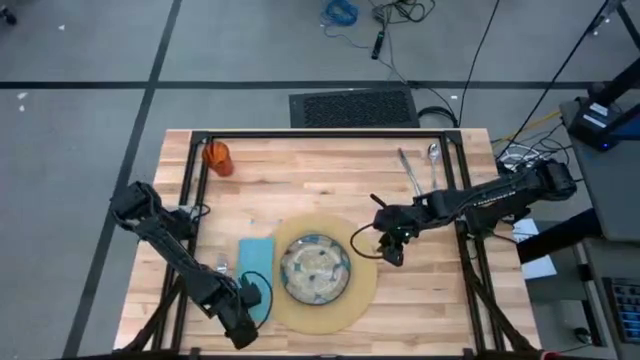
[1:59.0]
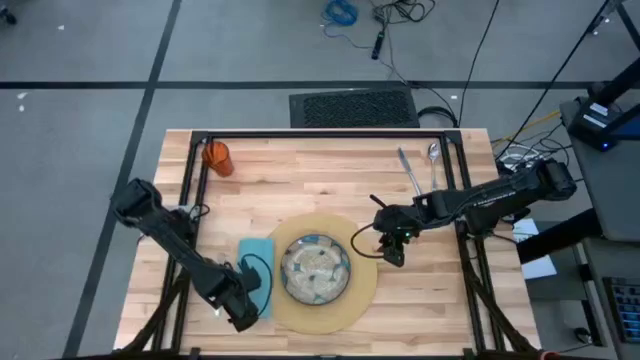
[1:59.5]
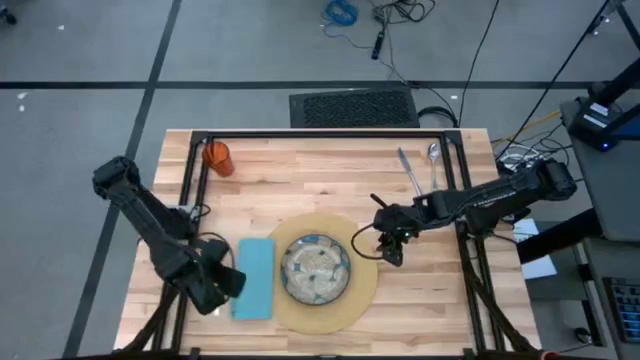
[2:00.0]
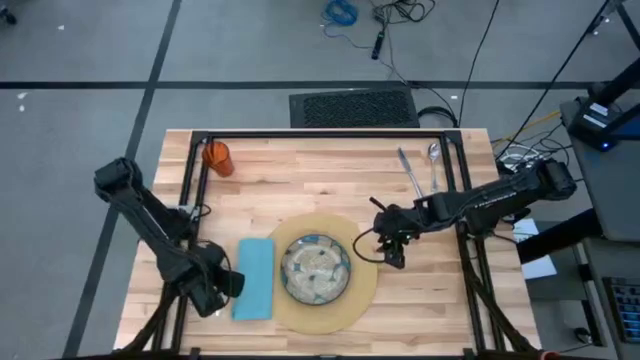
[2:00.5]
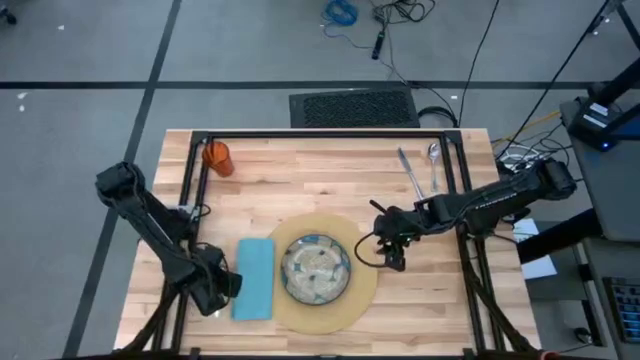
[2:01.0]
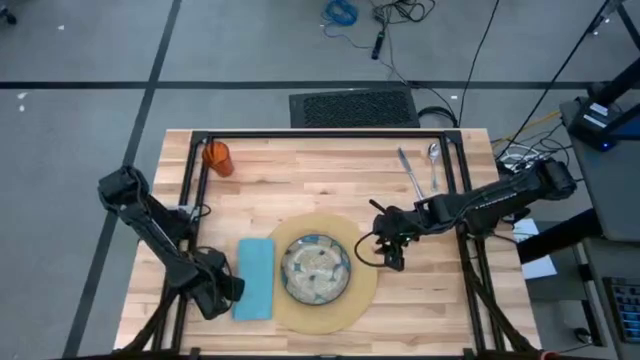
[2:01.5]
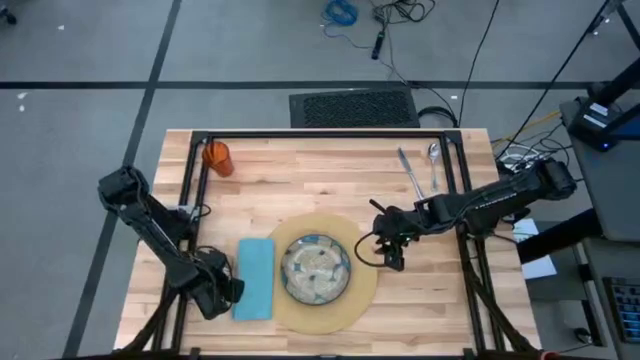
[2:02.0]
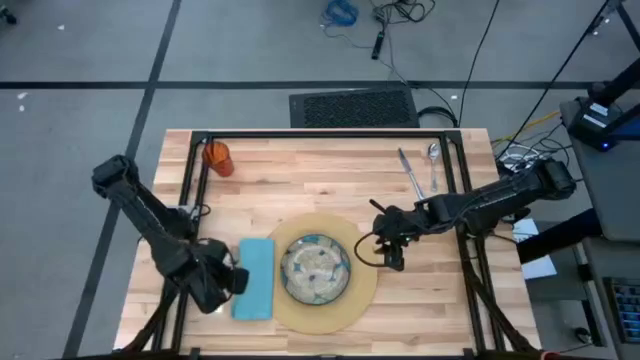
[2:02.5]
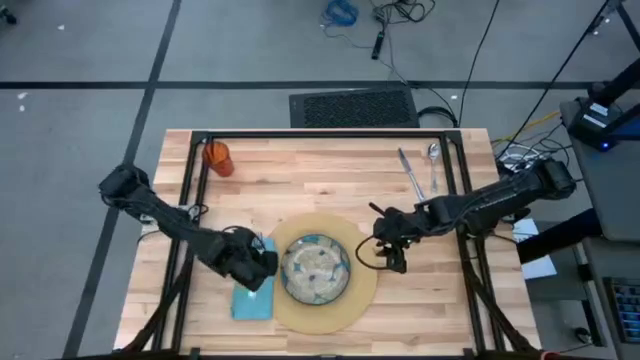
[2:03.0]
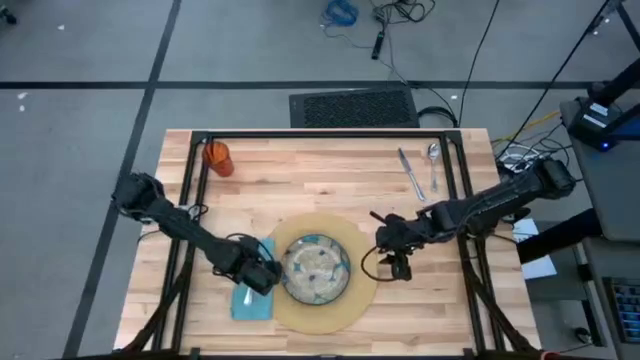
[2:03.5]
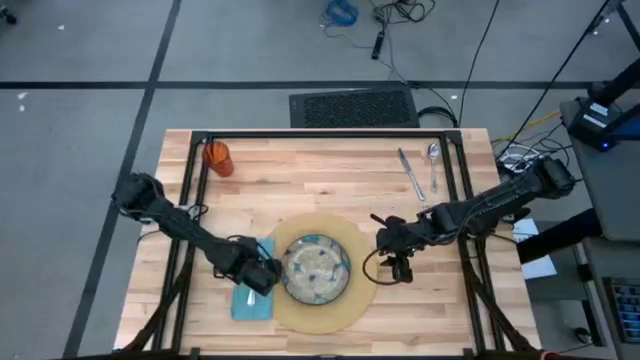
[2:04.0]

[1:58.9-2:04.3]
Task: Set table place
Put the fork on top of the blue napkin

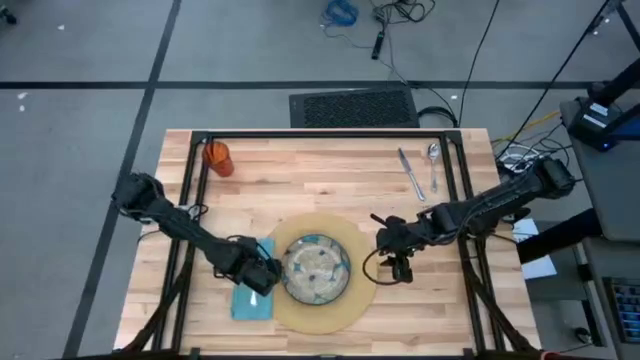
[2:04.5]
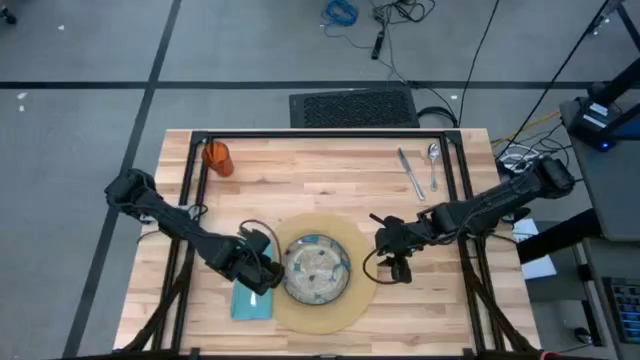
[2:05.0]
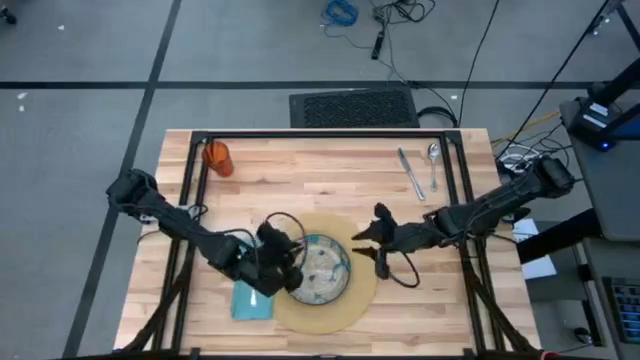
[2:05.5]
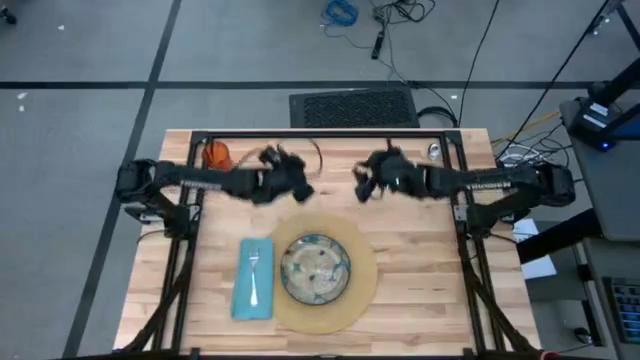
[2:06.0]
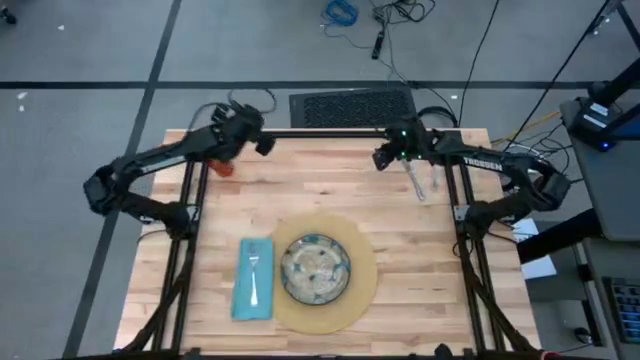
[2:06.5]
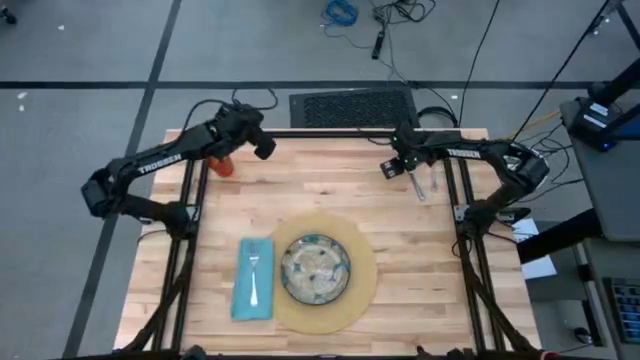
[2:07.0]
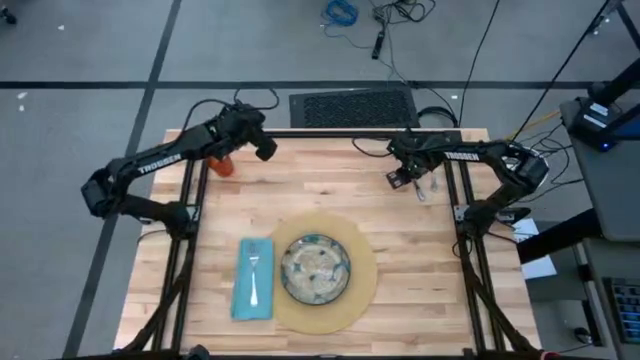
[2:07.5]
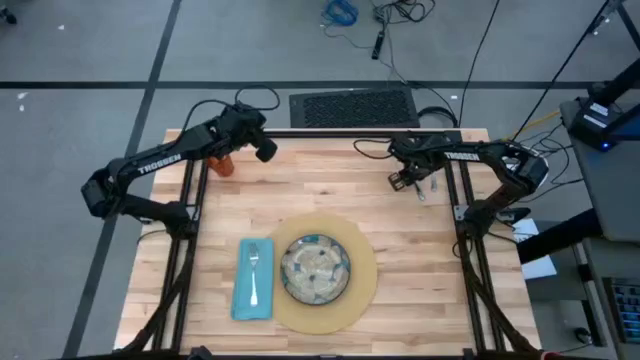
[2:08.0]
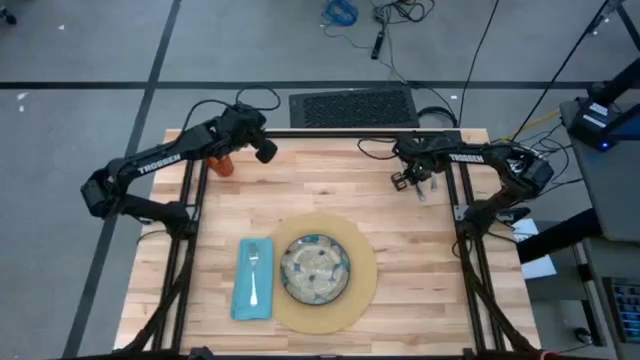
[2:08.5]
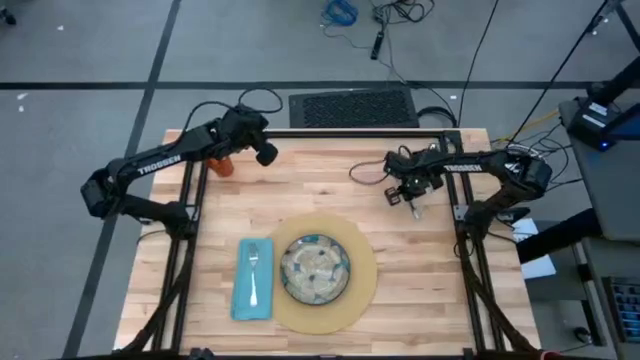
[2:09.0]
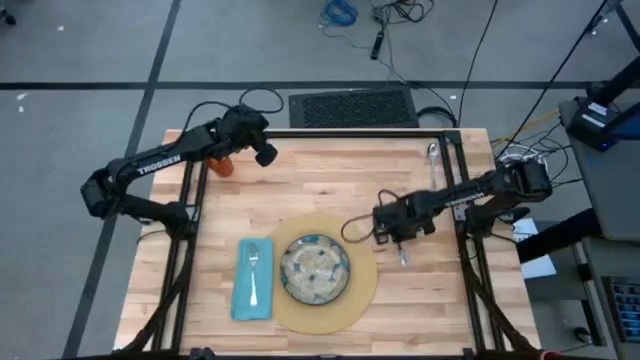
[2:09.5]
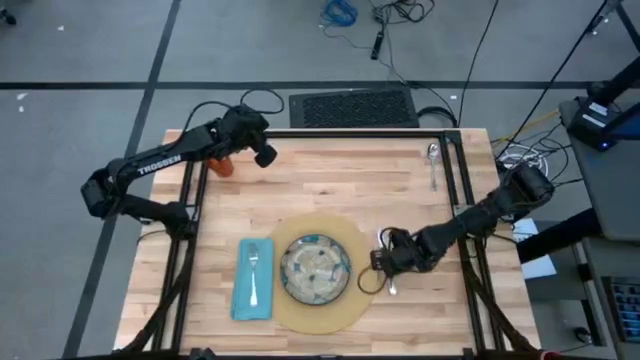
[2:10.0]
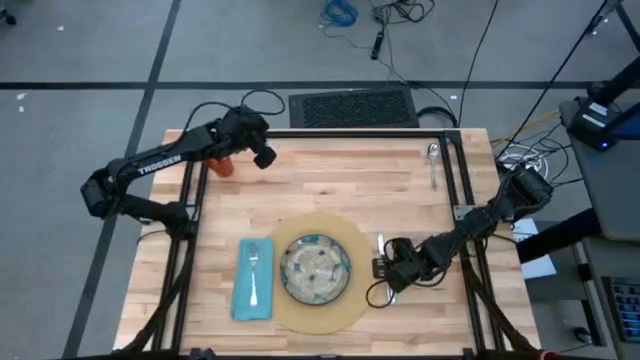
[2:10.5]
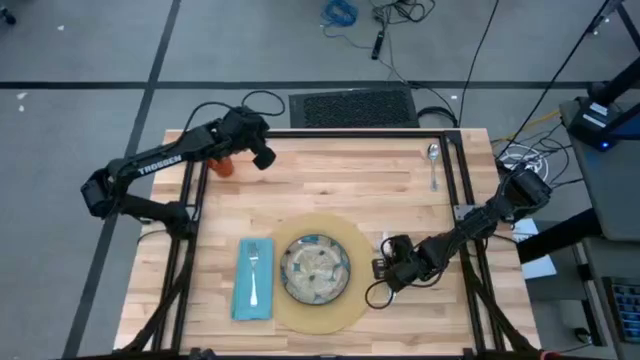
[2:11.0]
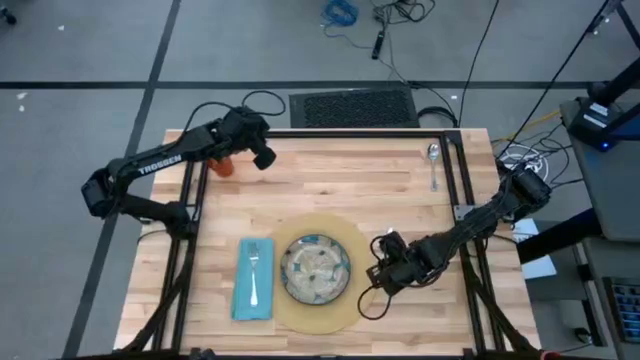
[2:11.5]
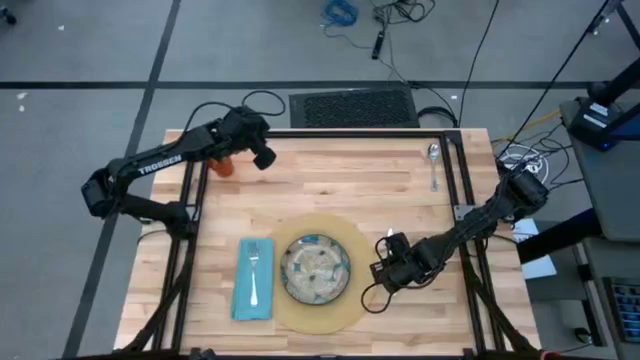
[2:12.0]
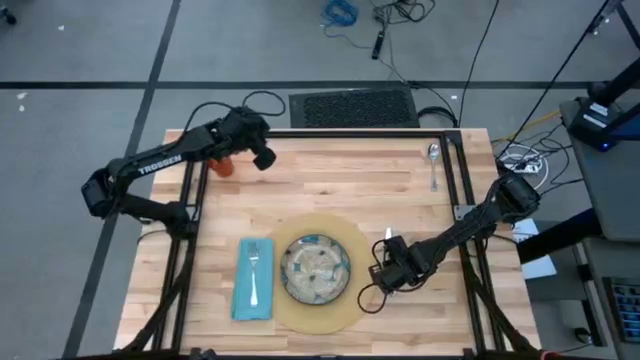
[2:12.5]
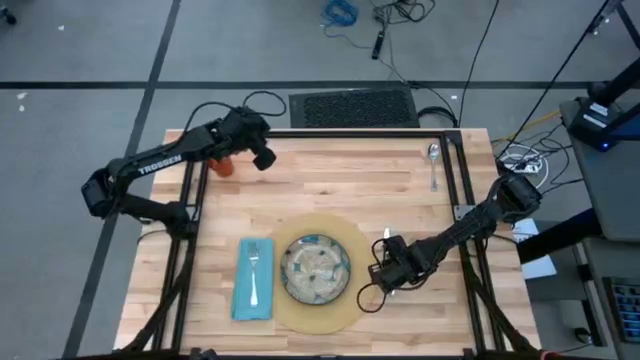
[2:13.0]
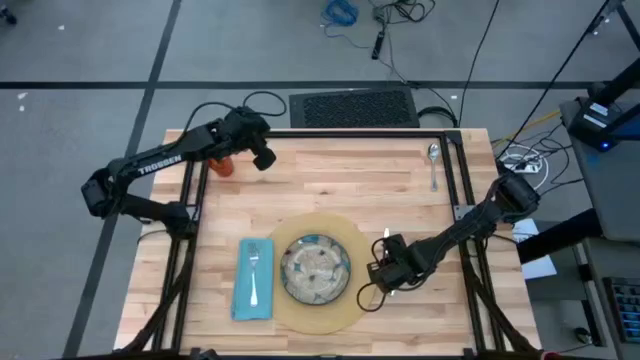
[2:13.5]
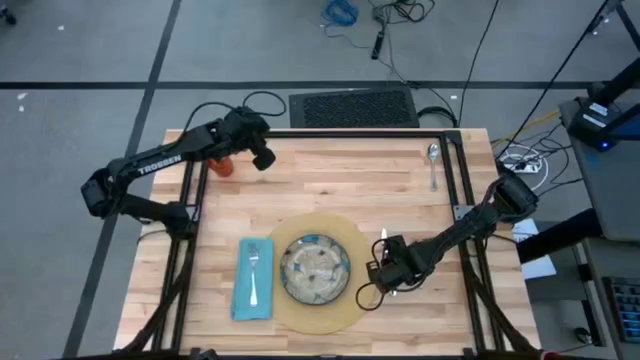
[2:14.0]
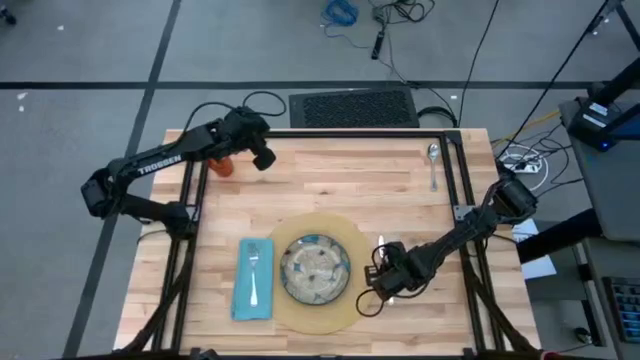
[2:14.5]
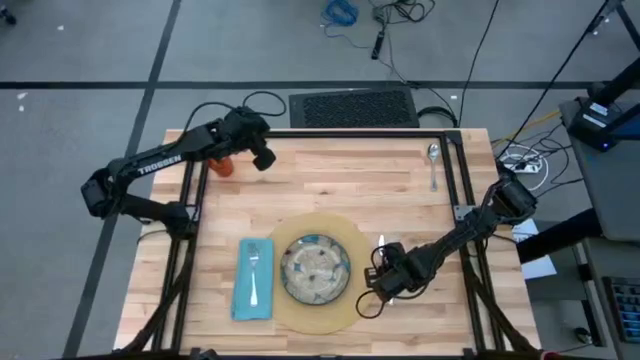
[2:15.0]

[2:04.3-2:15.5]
Put the knife on the right side of the brown mat

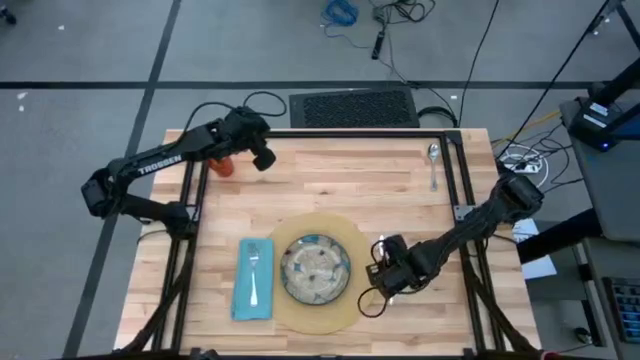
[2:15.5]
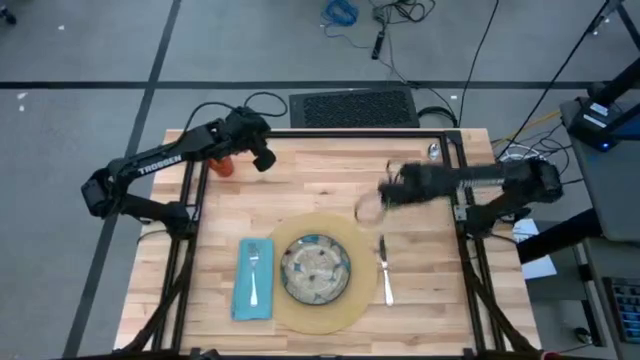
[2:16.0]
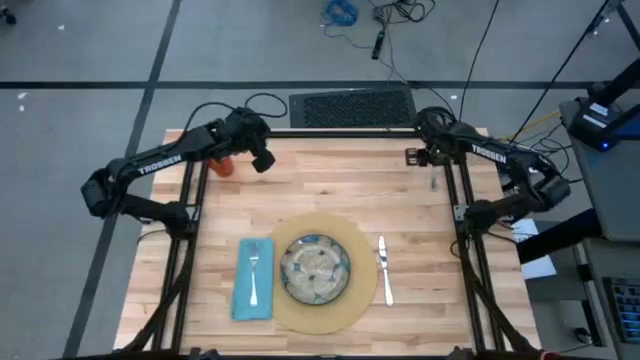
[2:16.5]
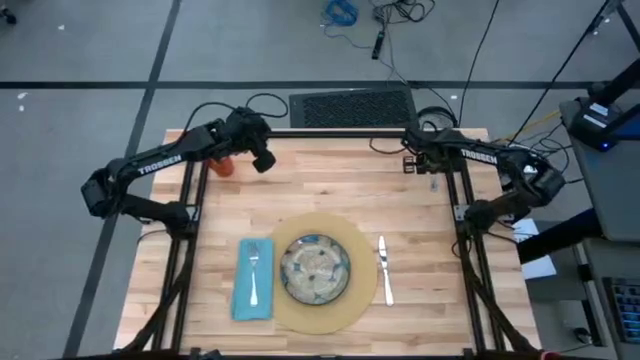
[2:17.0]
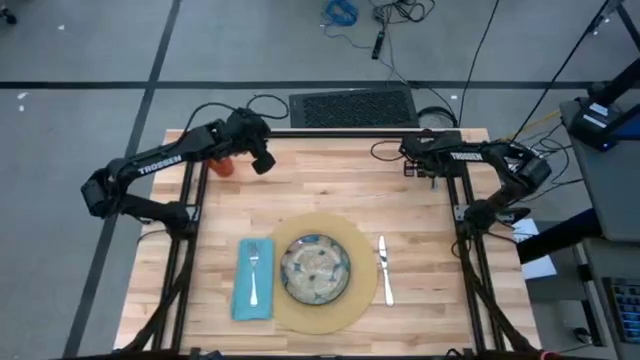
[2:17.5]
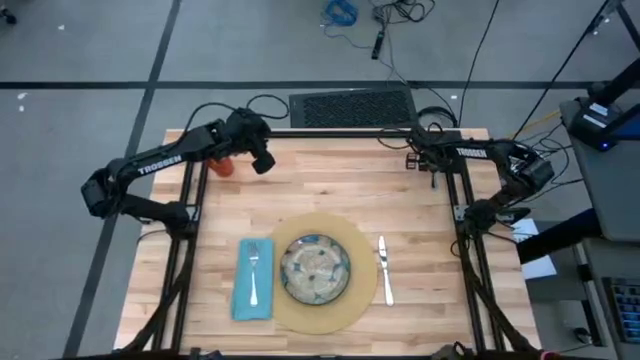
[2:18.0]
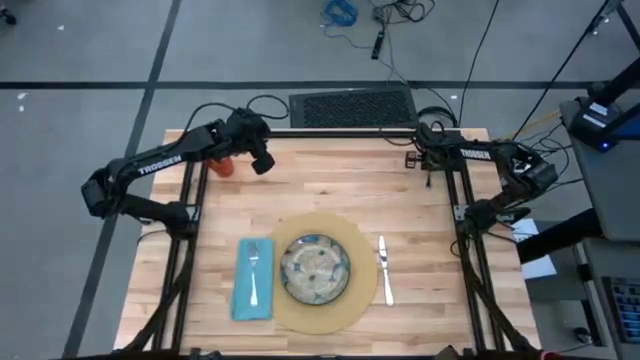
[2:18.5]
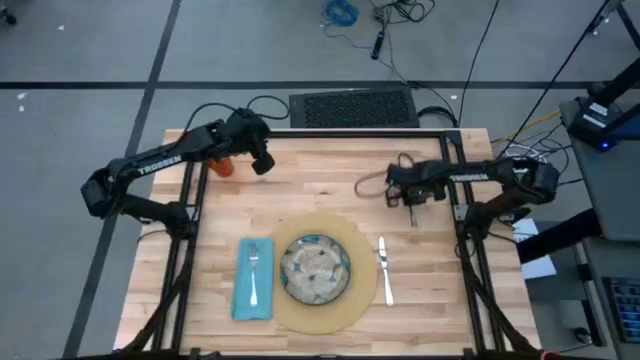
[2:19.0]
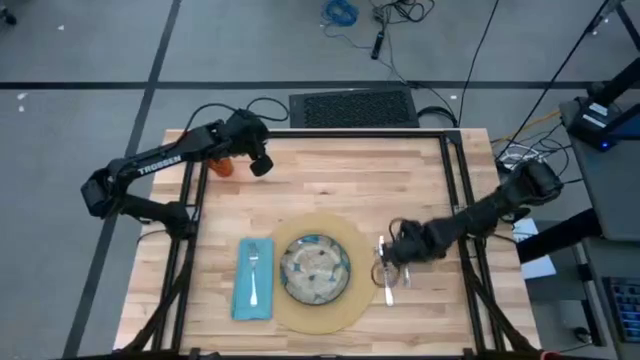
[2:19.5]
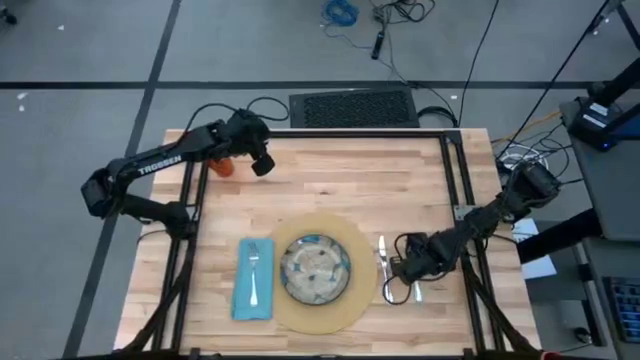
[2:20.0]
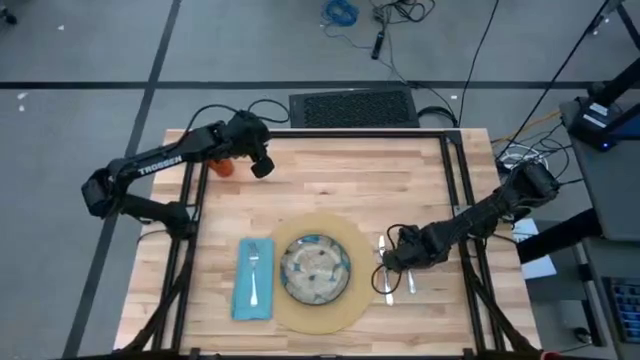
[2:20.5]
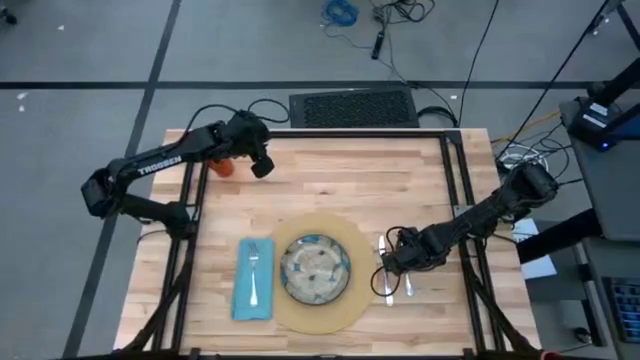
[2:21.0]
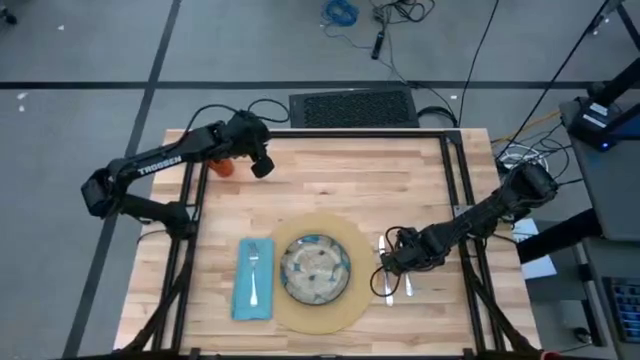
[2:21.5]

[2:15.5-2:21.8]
Put the silver spoon beside the silver knife
